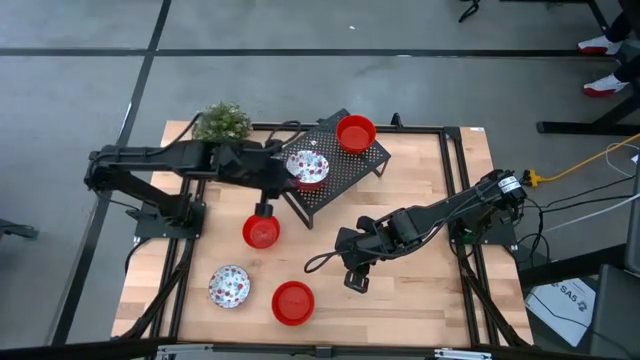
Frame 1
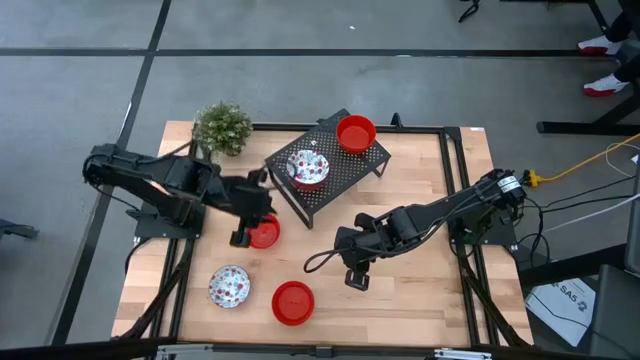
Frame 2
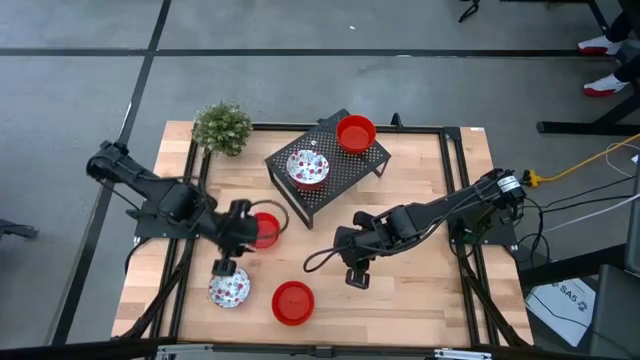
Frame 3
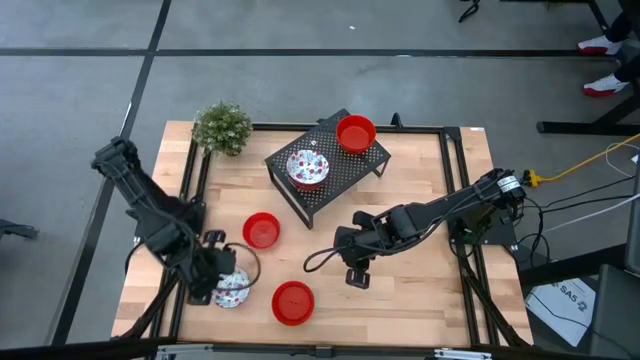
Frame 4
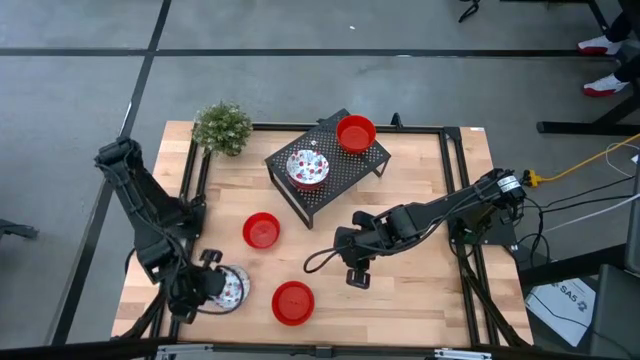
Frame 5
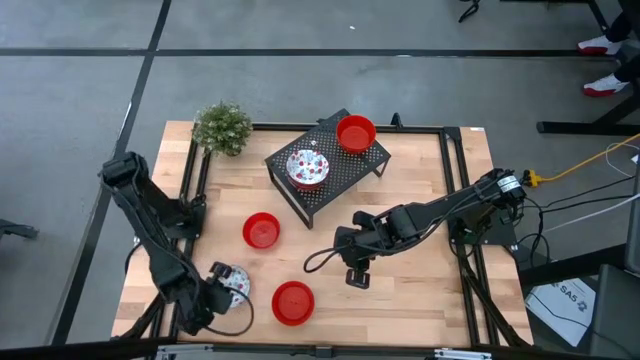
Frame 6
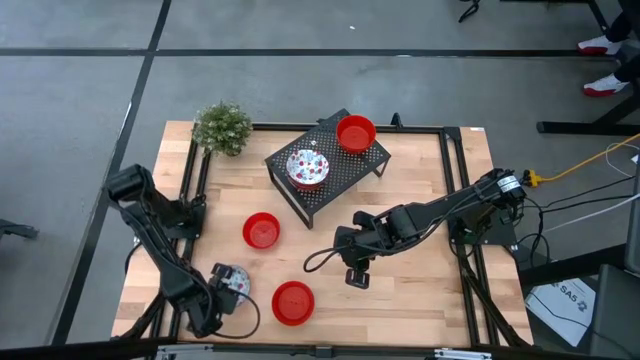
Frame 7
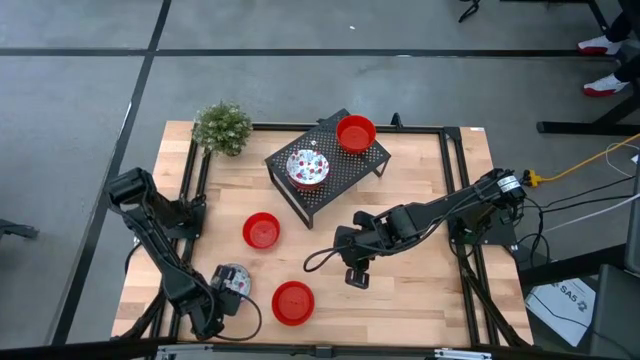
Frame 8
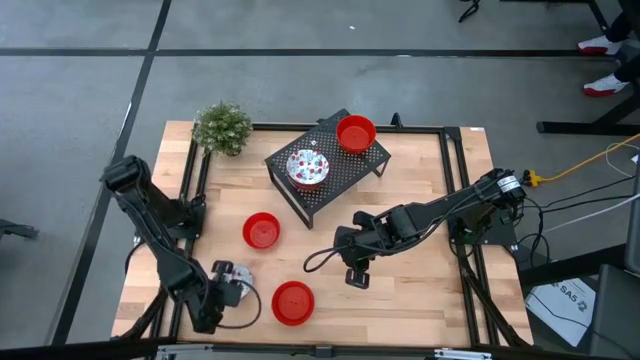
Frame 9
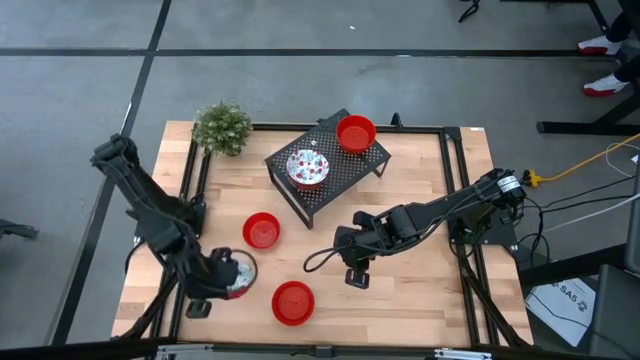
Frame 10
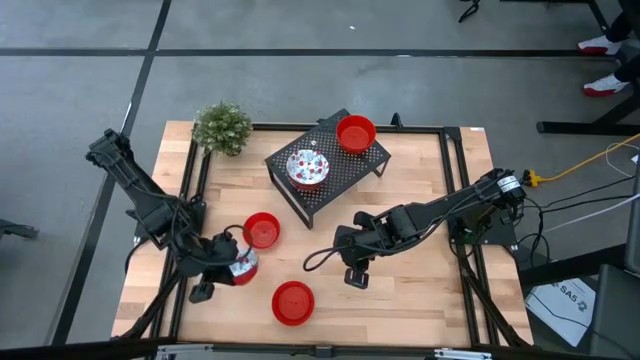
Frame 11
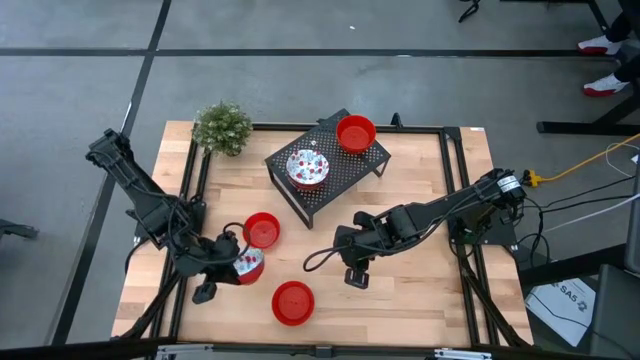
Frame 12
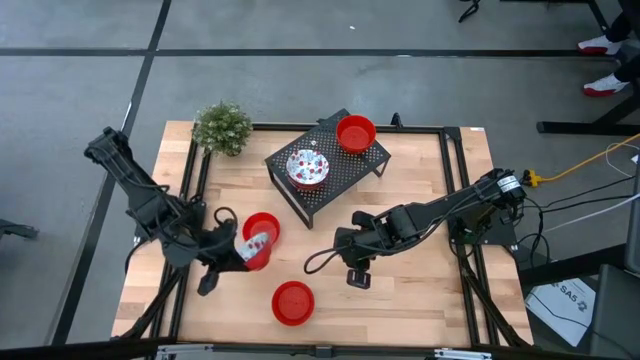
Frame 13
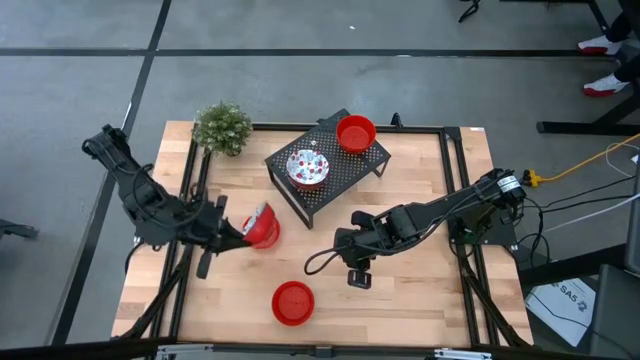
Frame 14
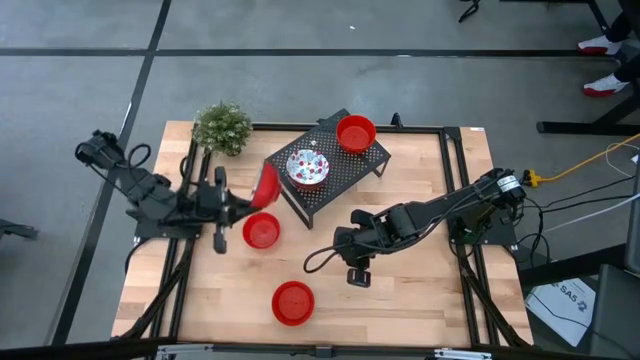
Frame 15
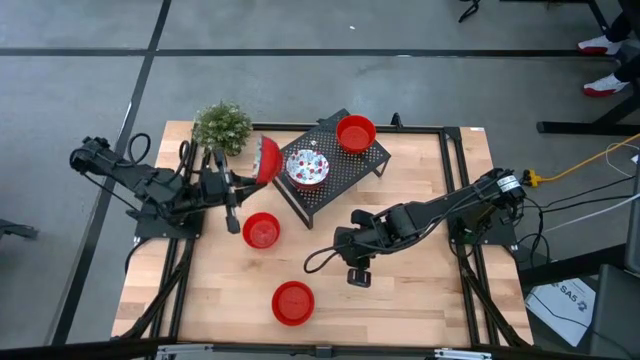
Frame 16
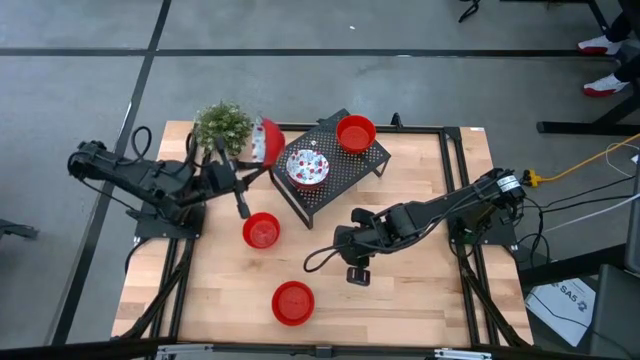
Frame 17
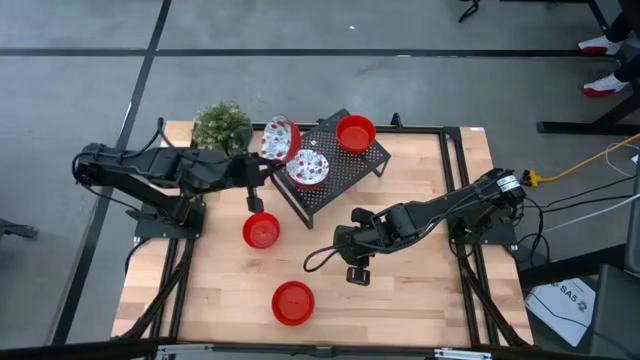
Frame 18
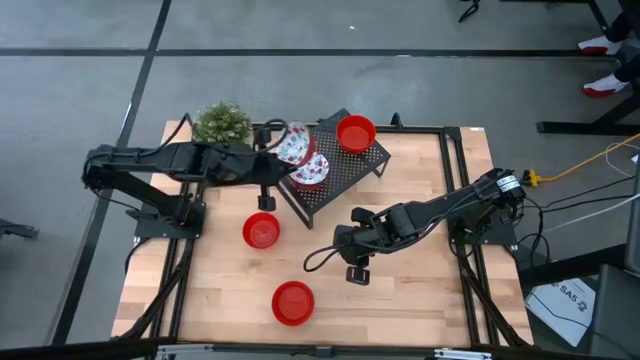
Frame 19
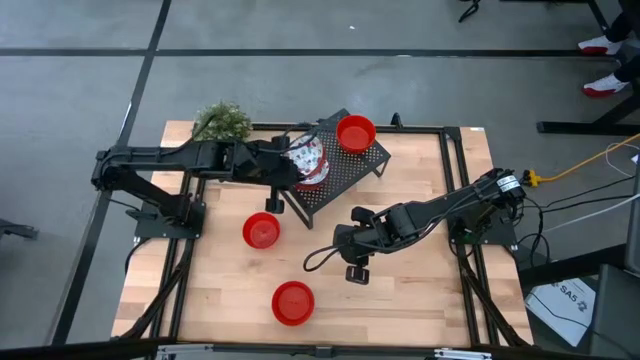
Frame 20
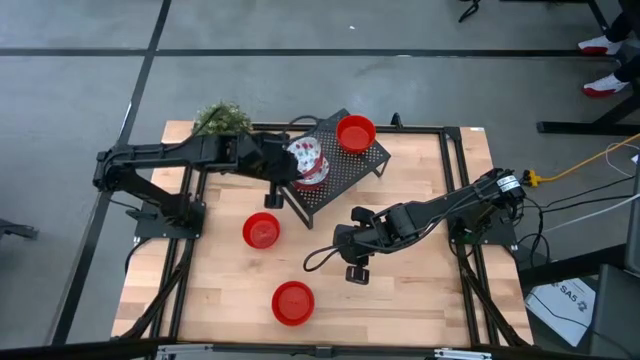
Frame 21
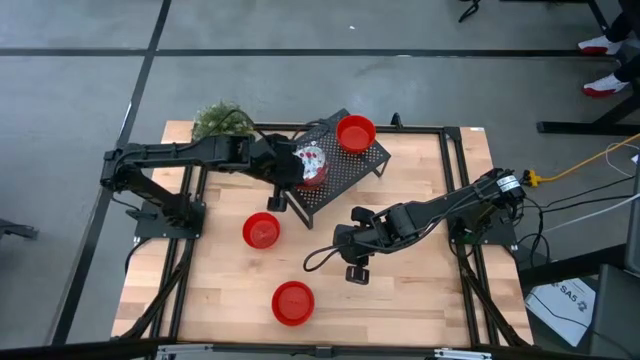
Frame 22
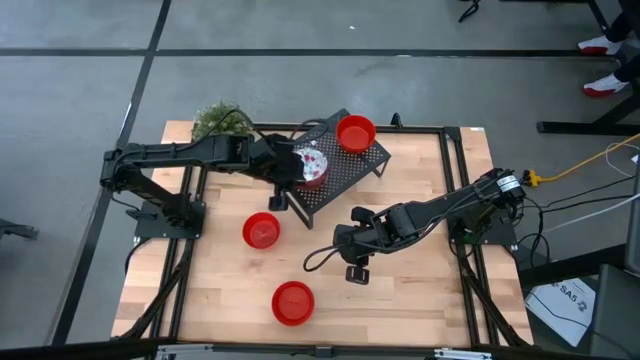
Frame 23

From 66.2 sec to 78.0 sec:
Task: Pick & Place Mini bowls
Stack the white patterned bowl on the white patterned bowl on the shelf

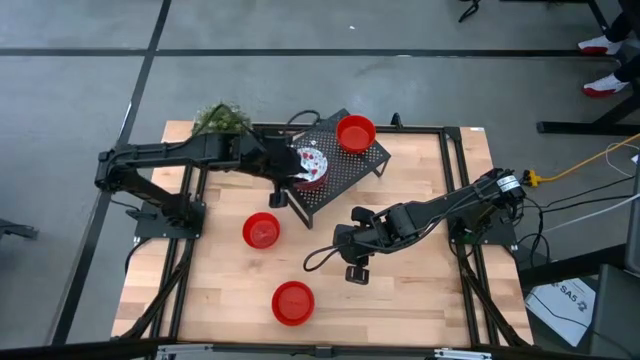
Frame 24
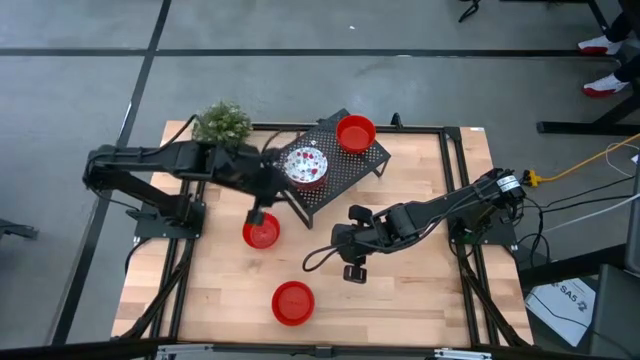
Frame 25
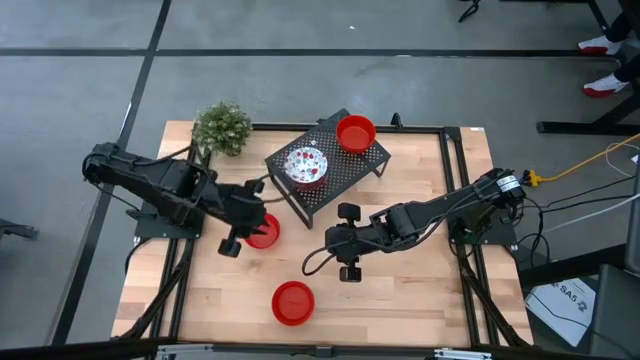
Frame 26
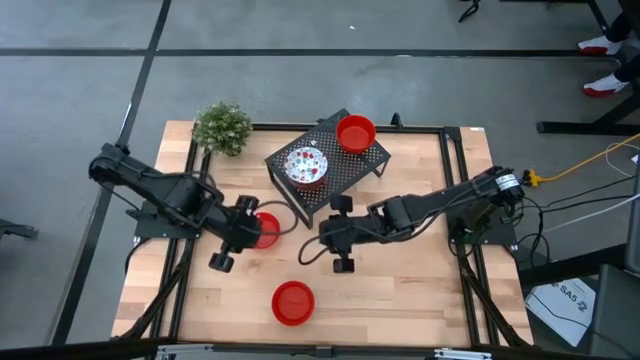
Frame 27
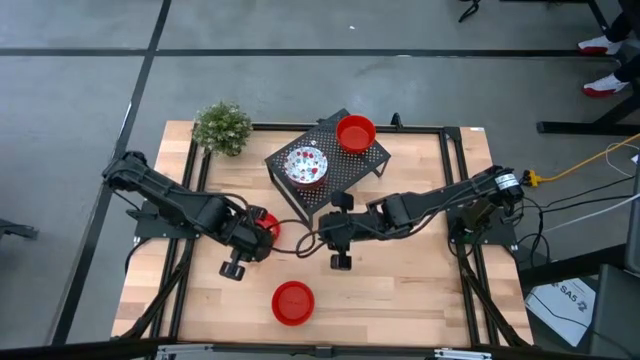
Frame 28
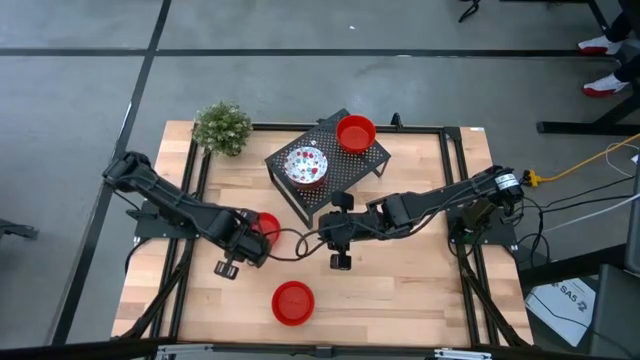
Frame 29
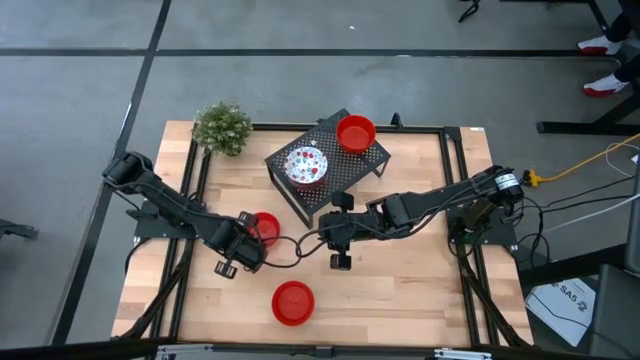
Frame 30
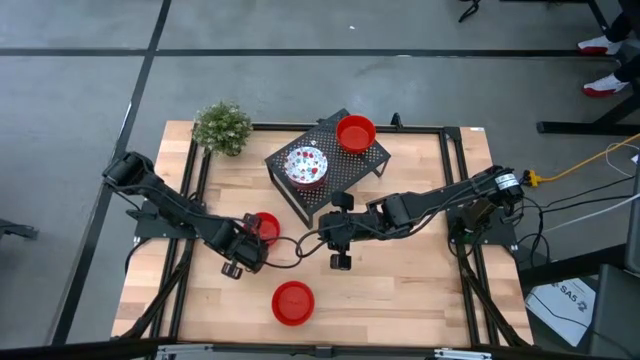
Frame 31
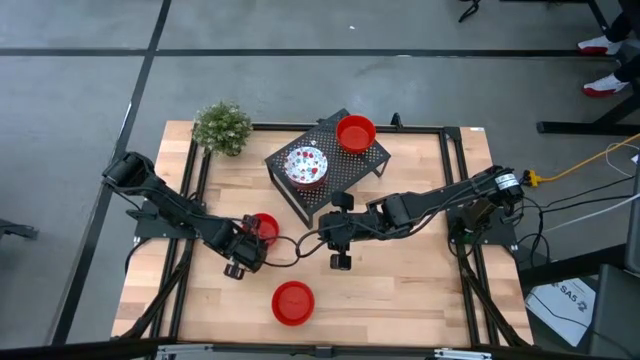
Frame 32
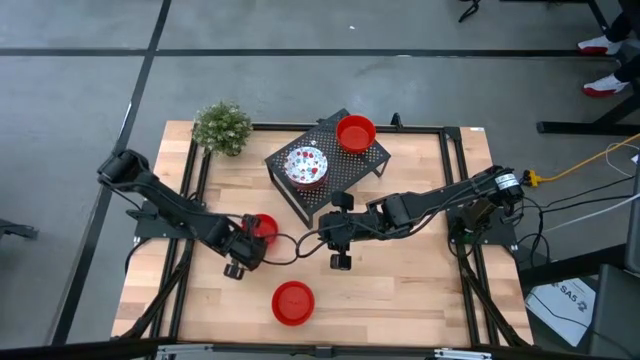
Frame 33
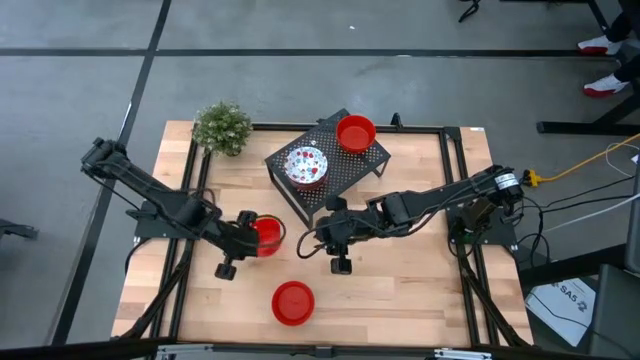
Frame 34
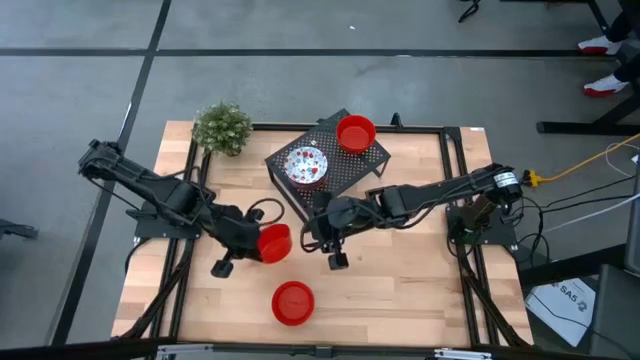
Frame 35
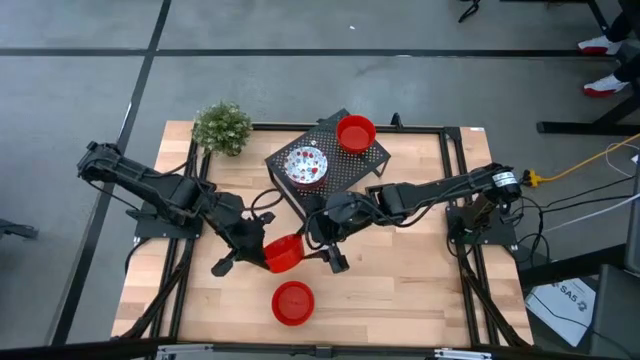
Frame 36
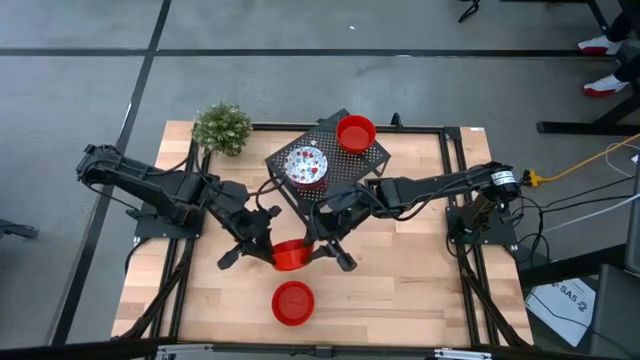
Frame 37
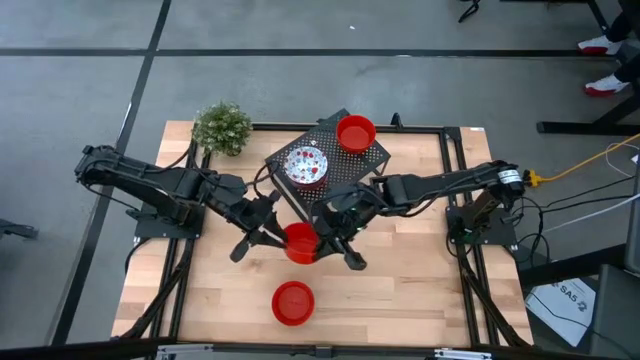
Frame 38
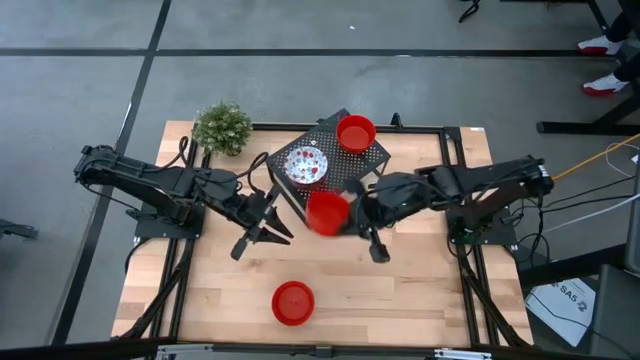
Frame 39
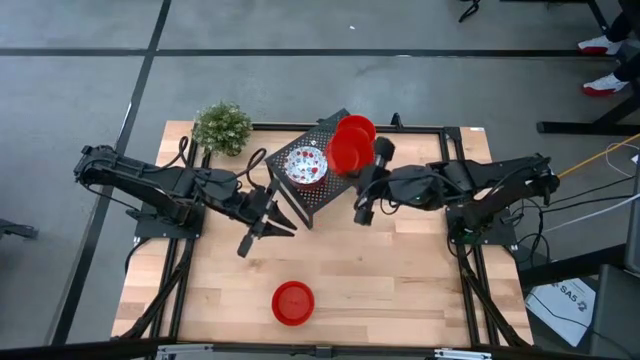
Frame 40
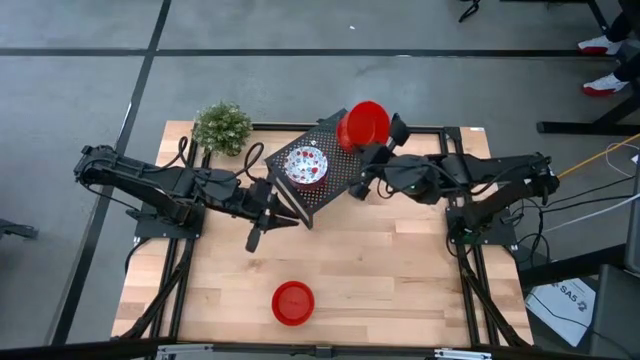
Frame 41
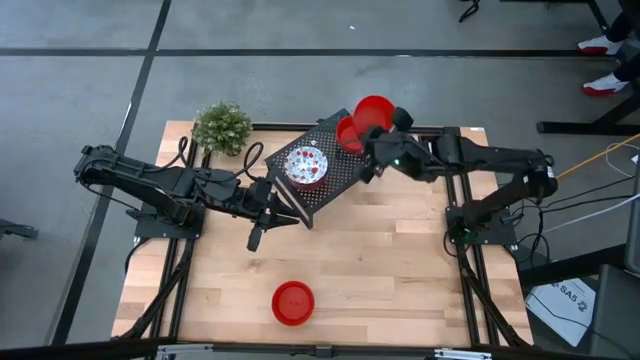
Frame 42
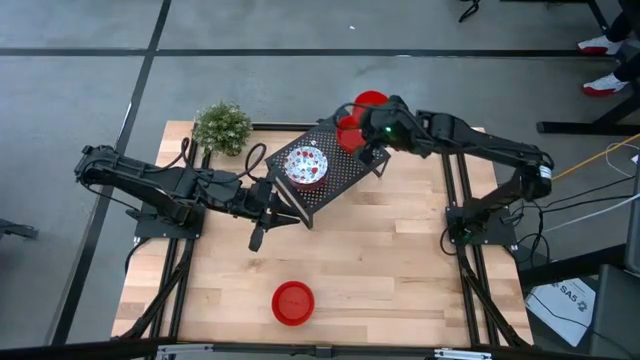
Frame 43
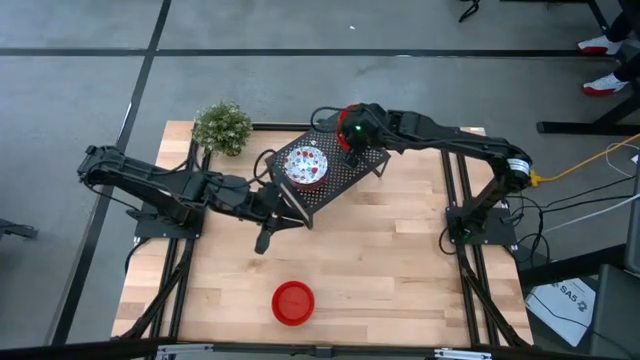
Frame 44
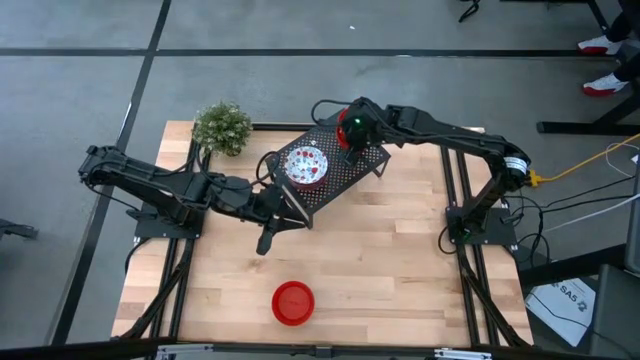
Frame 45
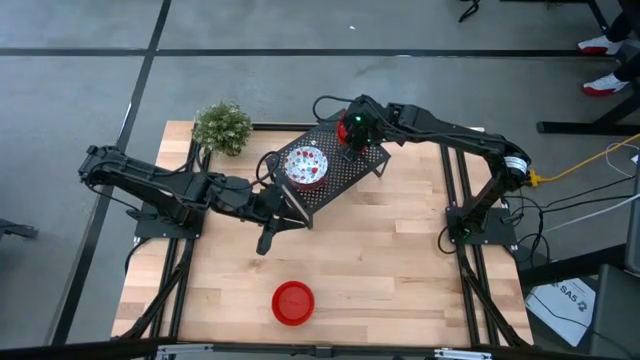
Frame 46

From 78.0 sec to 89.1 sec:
Stack the red bowl on the red bowl on the shelf

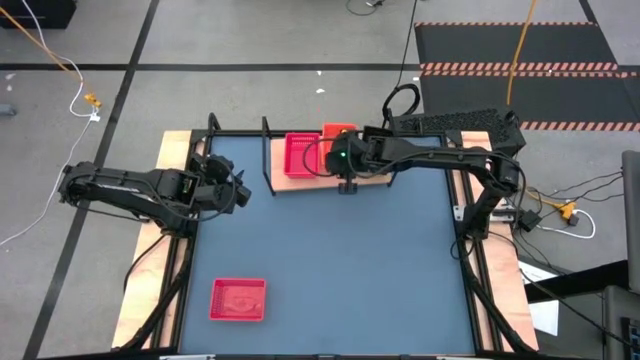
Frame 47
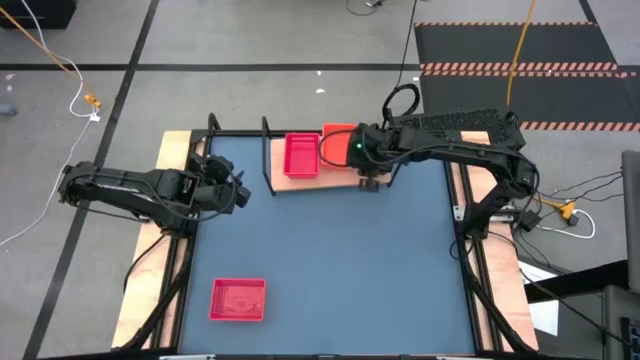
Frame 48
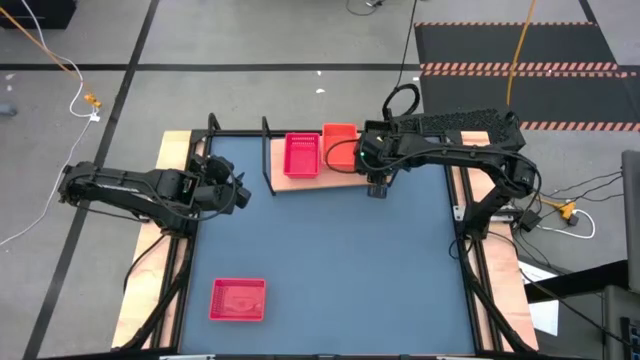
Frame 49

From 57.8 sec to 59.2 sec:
Task: Stack baskets on shelf by color
Adjust the stacked black bins on the shelf
